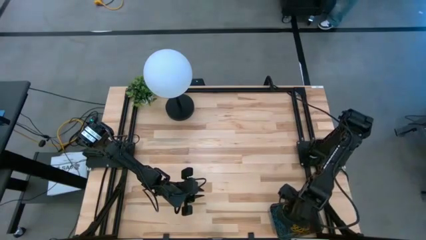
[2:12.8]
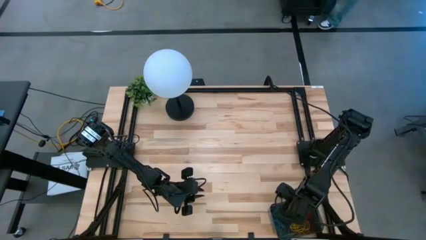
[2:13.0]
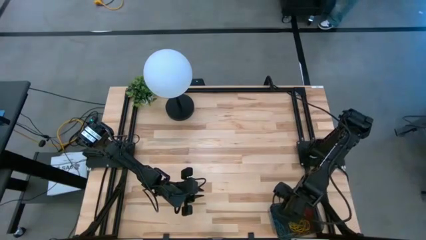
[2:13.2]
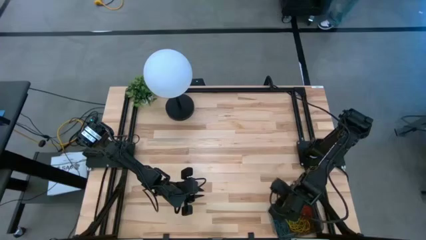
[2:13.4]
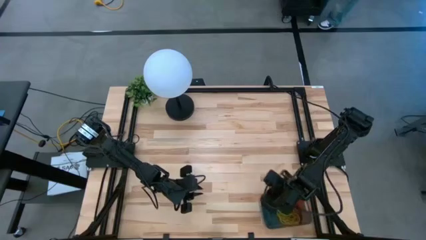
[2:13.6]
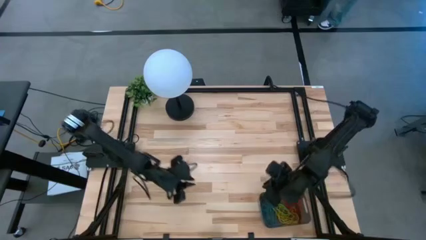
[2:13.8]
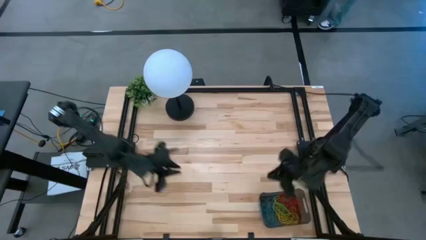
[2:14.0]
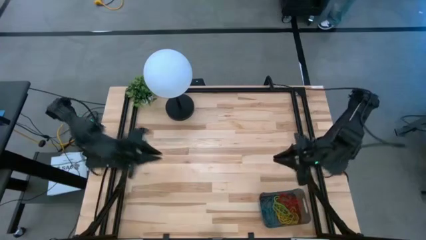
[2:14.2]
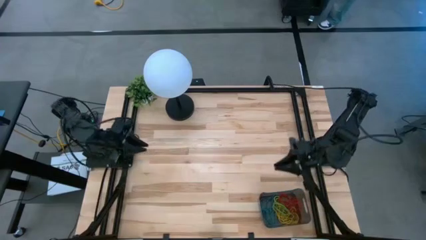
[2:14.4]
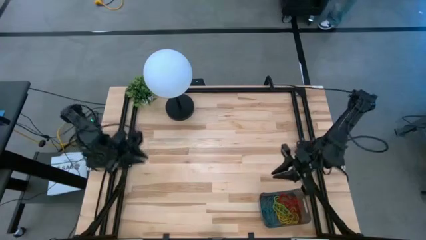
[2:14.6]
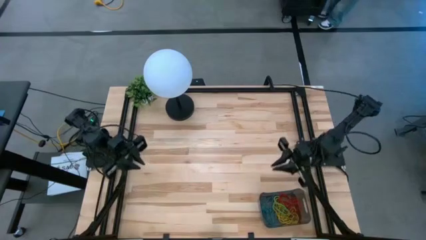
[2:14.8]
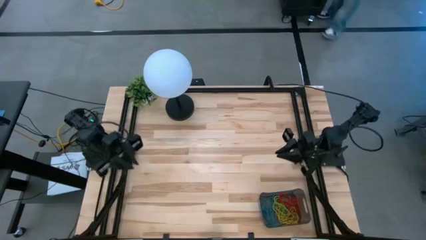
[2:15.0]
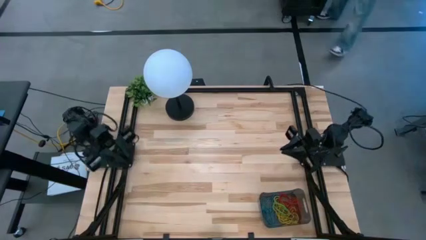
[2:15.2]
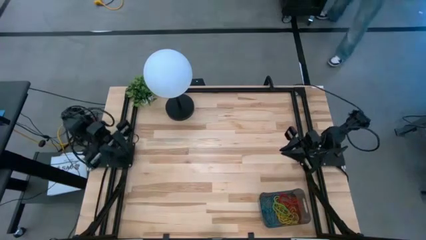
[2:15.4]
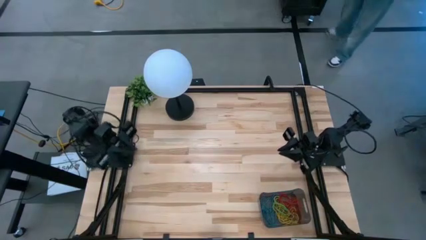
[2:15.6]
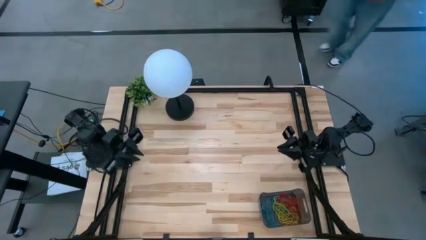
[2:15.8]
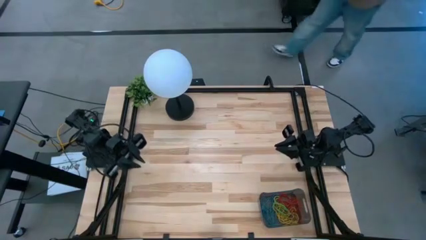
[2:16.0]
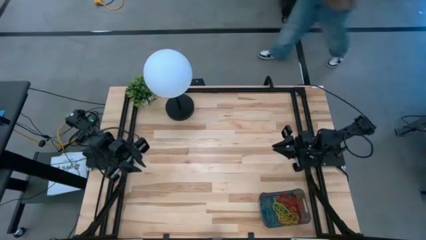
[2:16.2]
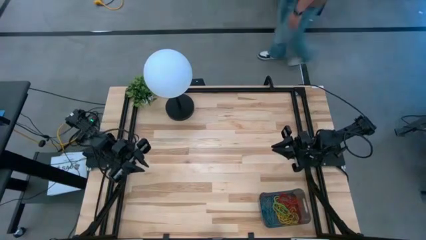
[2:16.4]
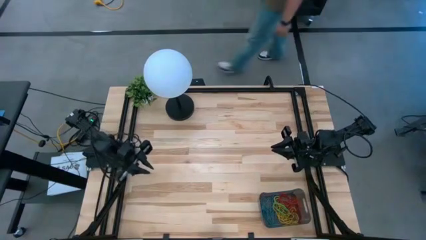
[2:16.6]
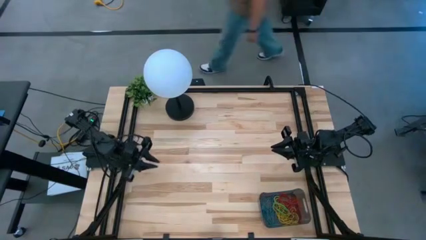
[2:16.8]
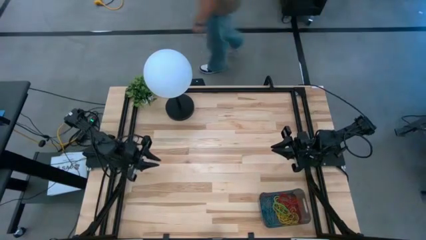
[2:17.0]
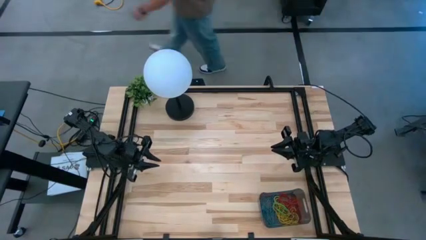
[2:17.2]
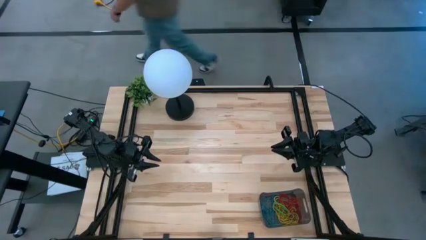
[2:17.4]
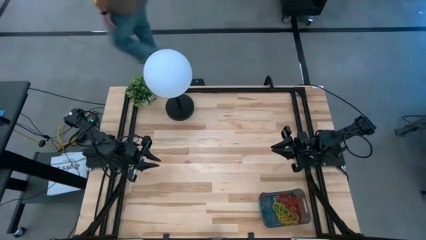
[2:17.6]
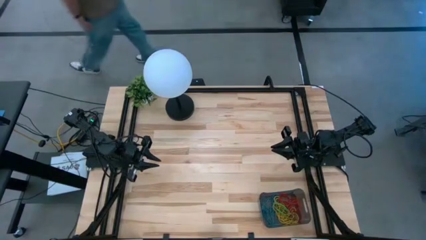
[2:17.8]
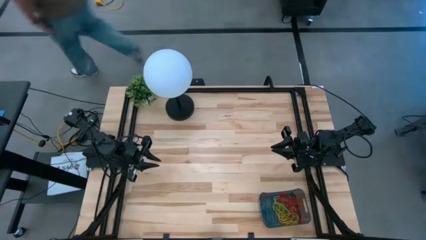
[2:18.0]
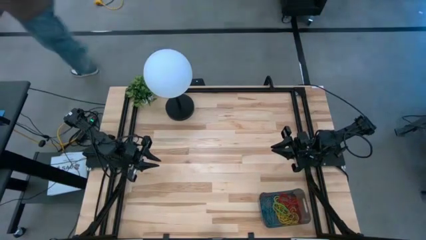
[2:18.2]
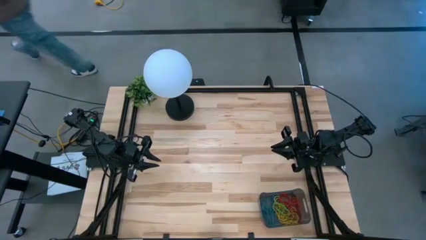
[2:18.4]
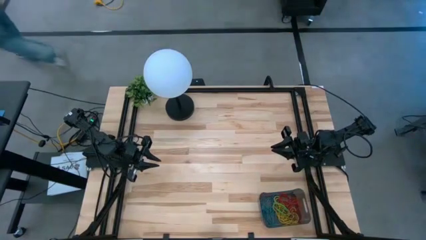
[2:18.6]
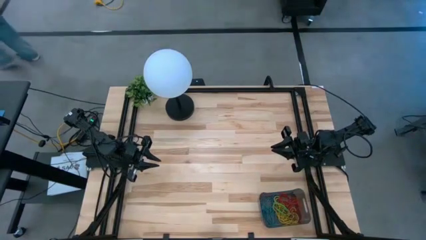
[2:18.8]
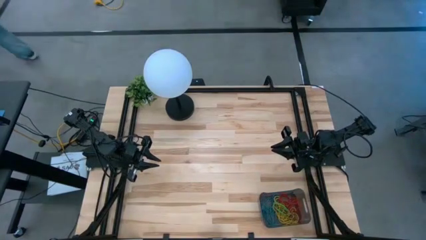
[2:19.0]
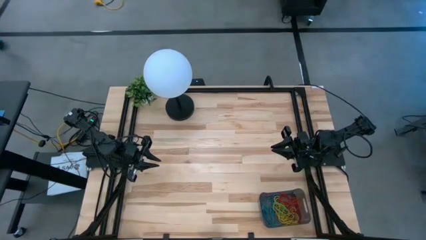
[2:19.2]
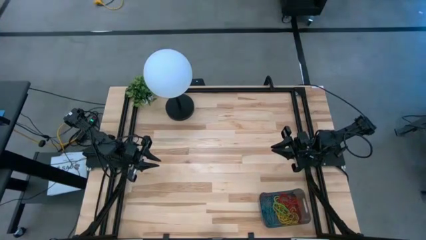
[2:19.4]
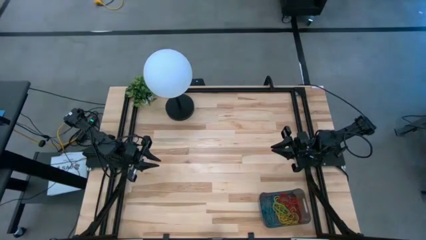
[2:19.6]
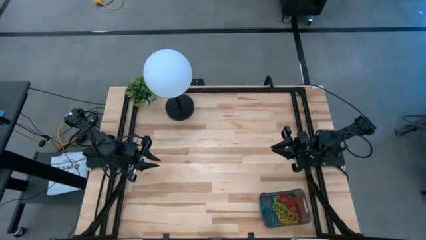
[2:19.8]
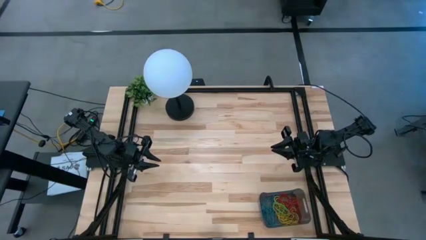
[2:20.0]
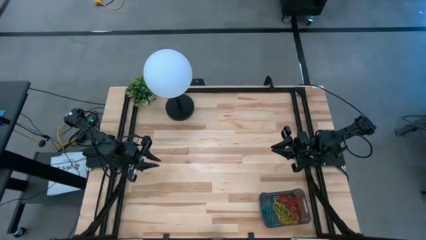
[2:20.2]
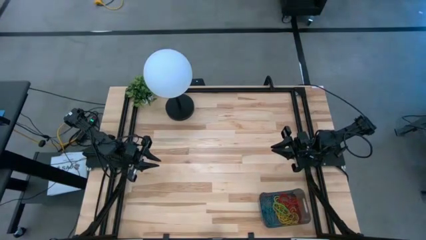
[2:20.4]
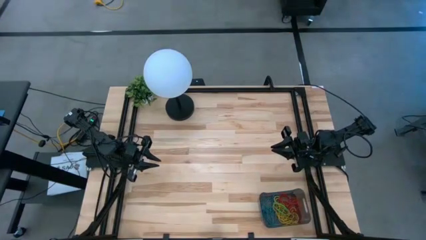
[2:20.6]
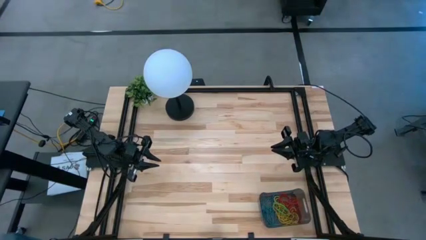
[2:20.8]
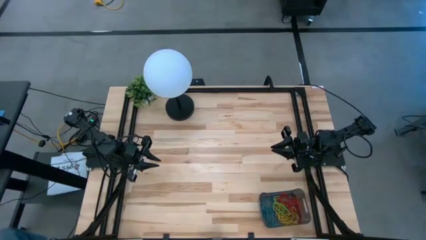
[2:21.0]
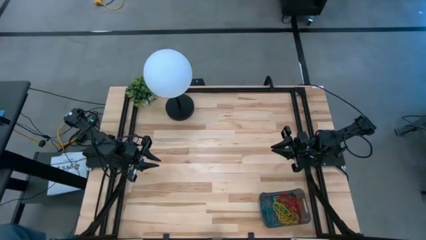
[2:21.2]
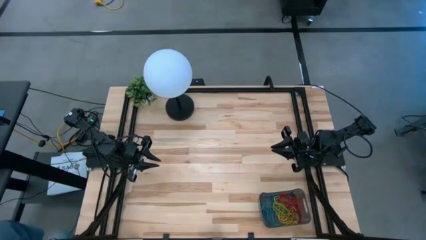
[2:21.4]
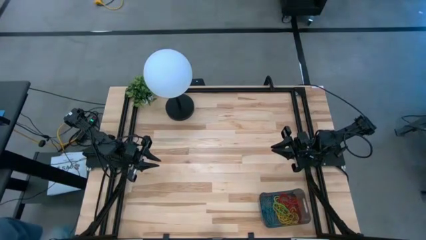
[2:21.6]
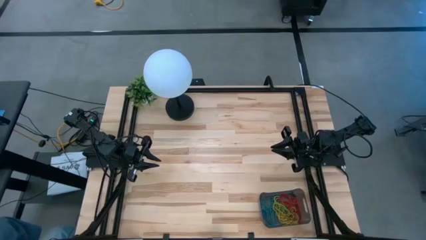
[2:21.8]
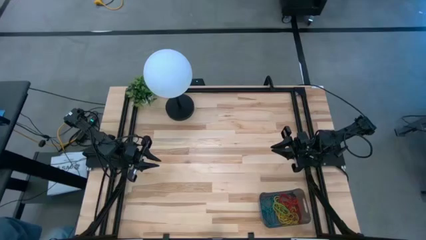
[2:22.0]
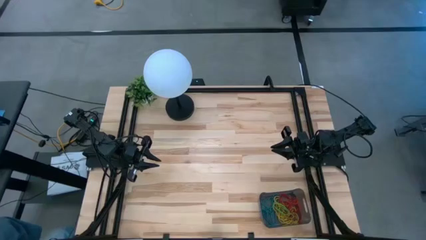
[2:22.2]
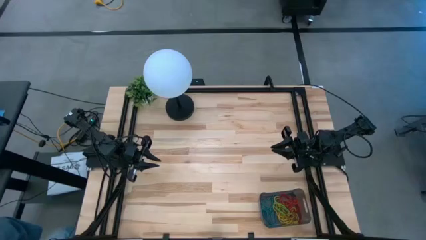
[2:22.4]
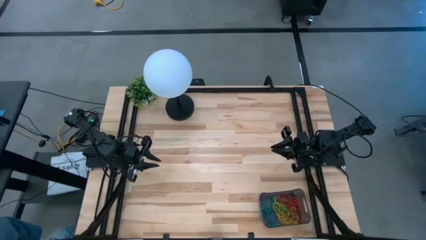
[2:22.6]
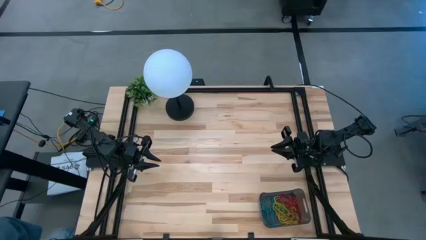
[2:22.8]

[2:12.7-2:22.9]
Task: Pick and place items into bin
Return to Home Position

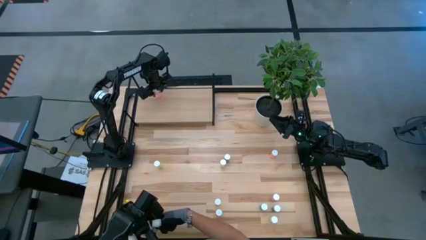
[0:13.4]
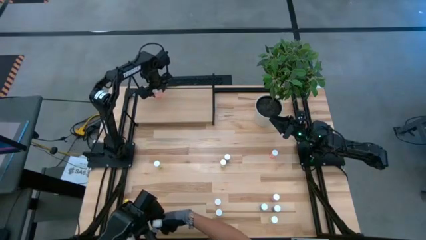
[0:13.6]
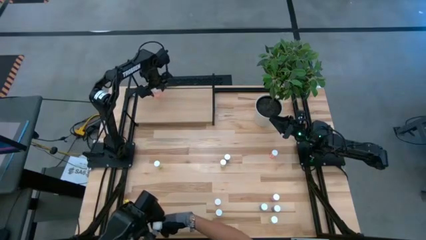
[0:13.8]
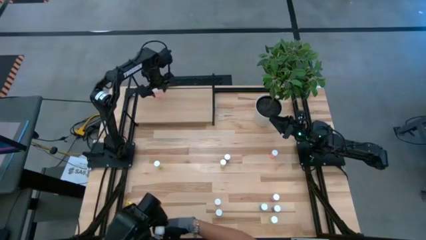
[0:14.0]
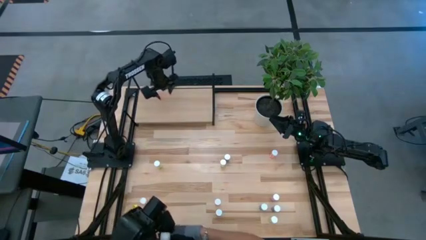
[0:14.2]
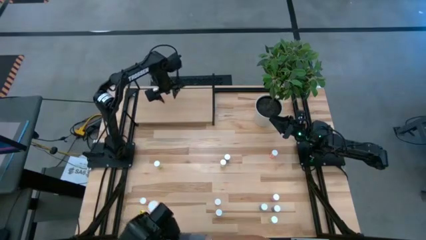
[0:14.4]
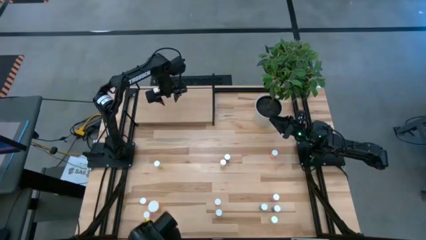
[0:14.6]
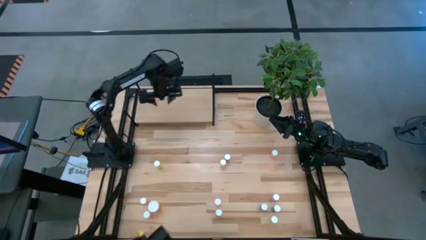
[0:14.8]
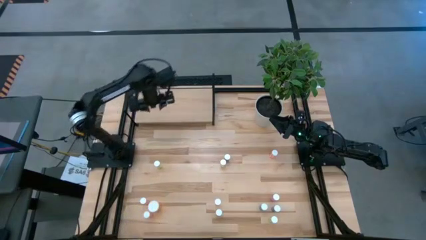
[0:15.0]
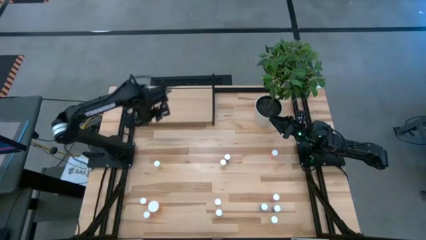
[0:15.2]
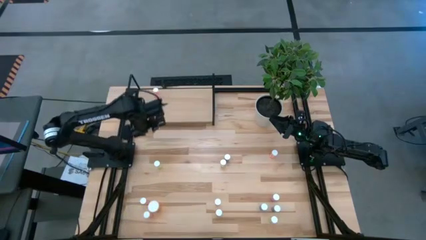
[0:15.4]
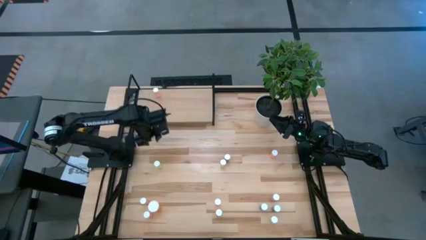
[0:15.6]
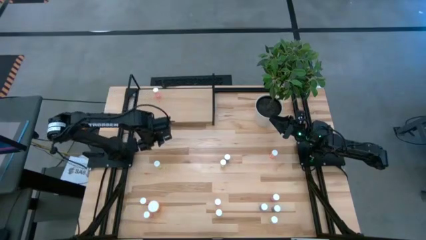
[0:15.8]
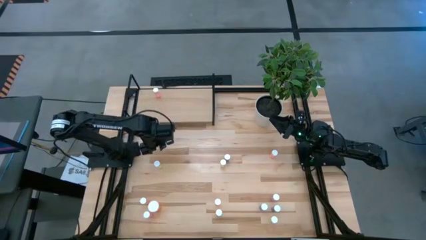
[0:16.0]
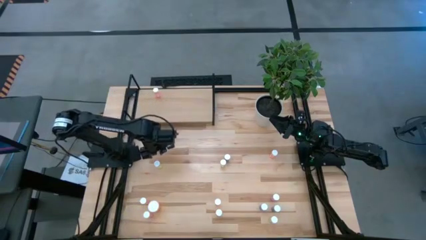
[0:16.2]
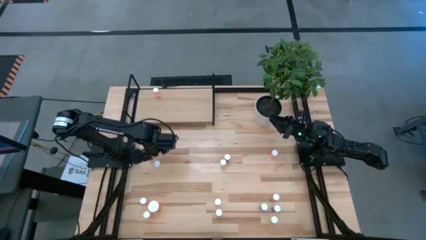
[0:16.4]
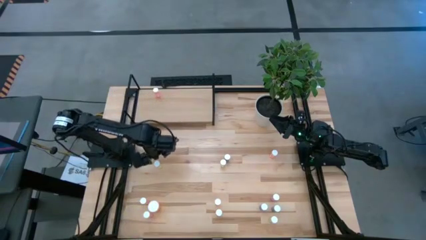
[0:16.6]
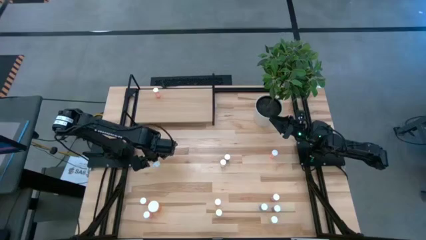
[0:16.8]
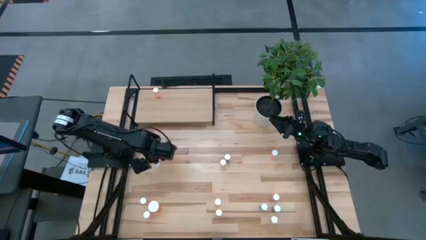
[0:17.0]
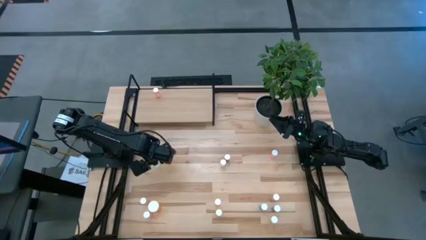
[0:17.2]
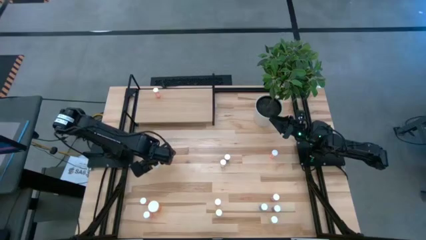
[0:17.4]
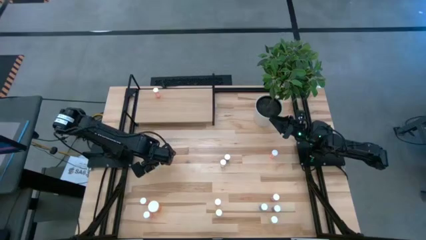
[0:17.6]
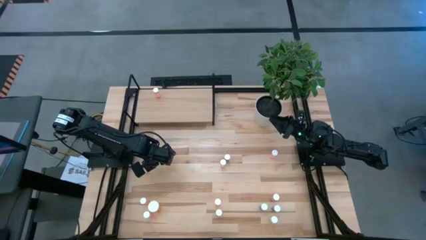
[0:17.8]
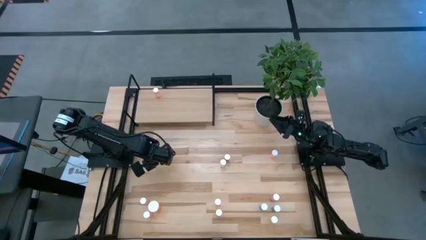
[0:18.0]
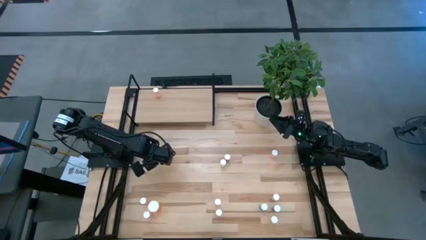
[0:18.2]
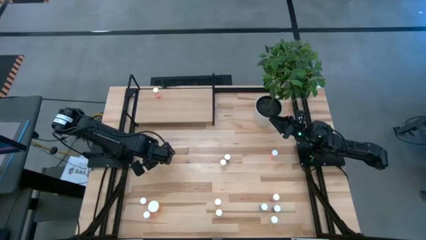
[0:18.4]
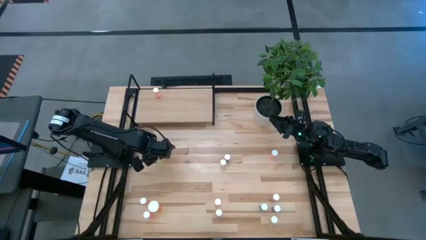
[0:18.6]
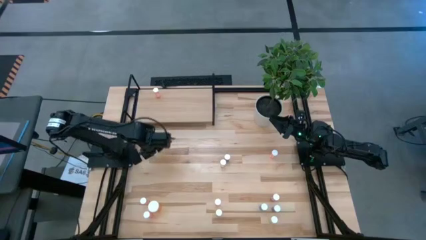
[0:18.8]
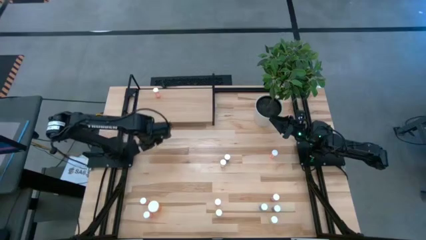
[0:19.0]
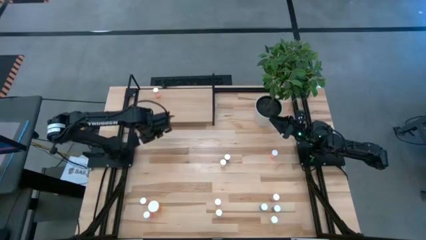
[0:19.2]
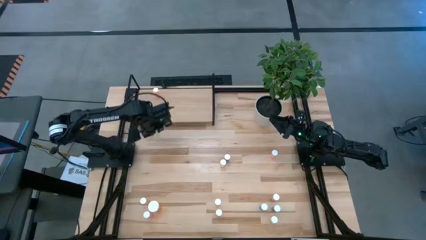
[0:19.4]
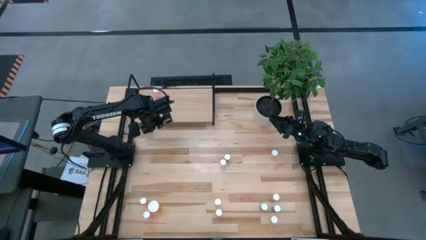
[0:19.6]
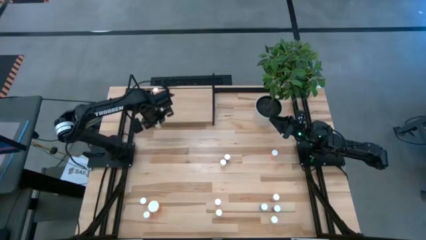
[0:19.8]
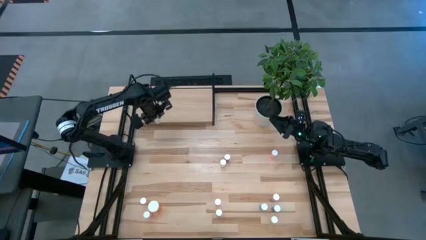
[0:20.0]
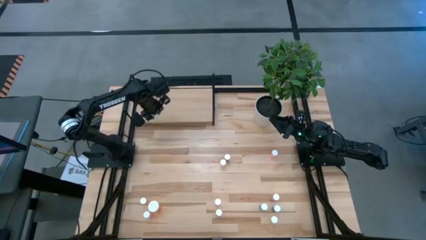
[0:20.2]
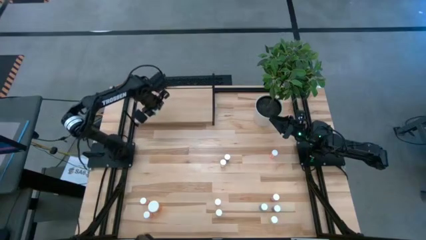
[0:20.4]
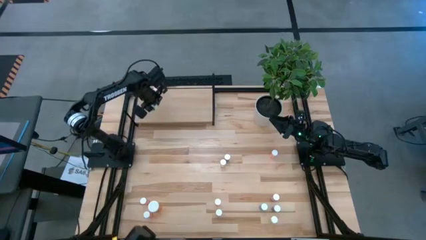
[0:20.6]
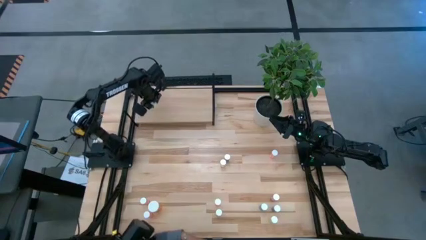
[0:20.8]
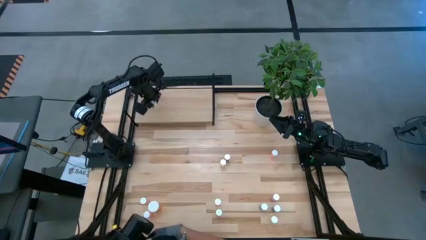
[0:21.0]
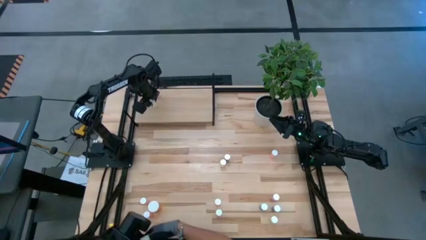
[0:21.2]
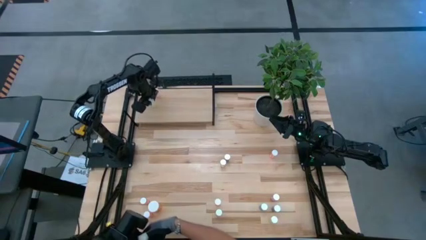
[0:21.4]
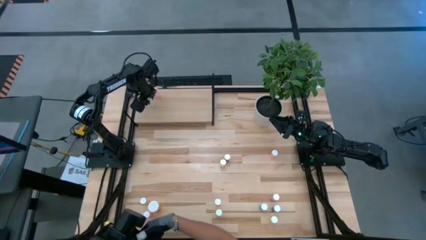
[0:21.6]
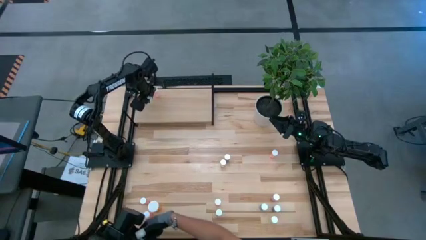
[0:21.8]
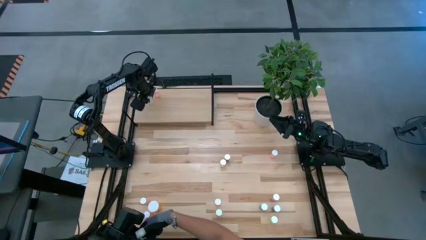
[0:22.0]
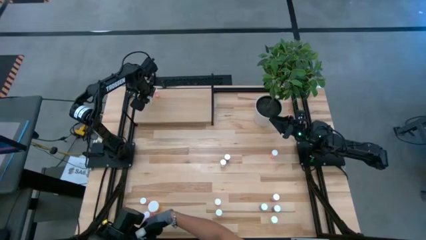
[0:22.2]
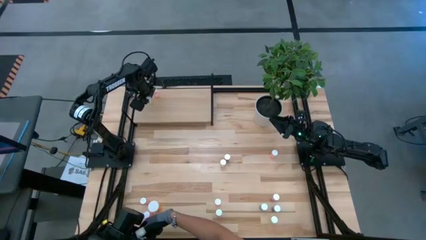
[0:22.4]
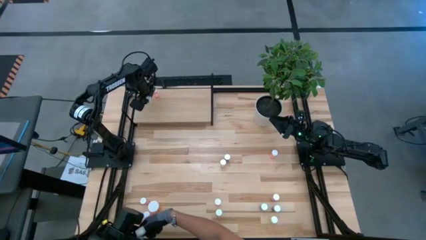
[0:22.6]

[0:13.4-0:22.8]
Task: Pick and place medicine bottles onto shelf by color
Put the yellow pill bottle on the shelf
